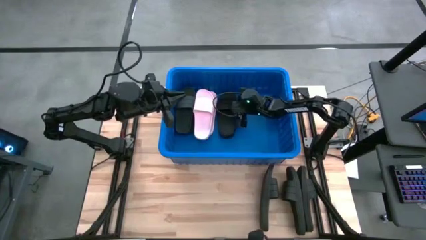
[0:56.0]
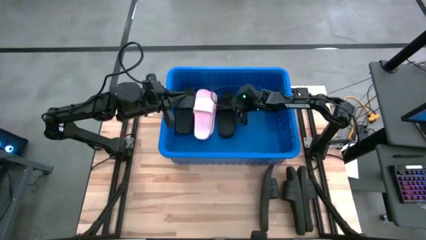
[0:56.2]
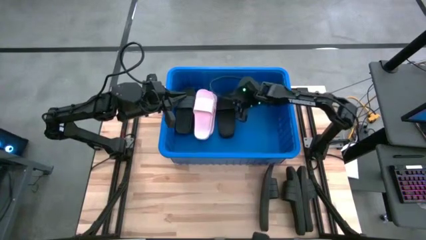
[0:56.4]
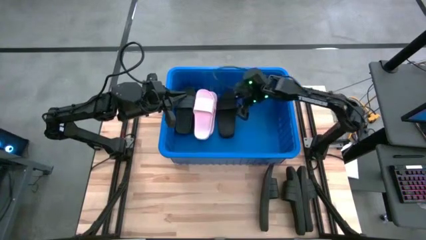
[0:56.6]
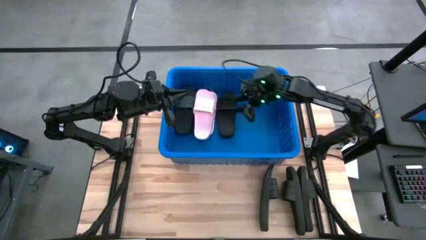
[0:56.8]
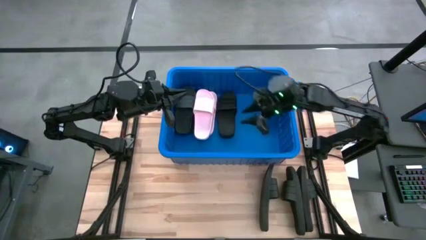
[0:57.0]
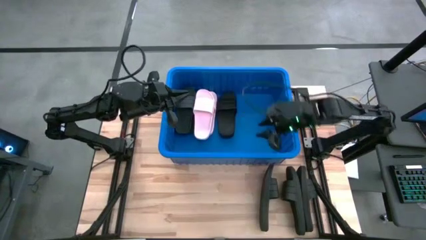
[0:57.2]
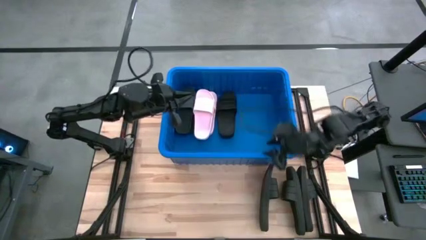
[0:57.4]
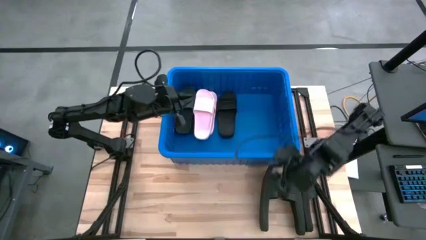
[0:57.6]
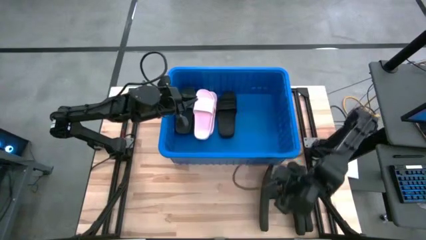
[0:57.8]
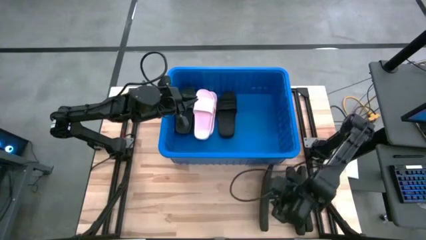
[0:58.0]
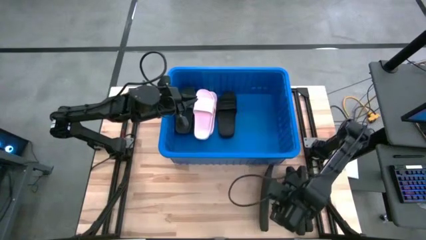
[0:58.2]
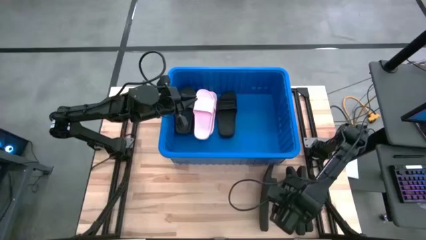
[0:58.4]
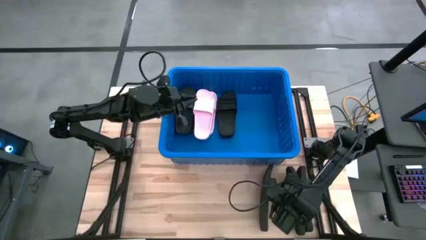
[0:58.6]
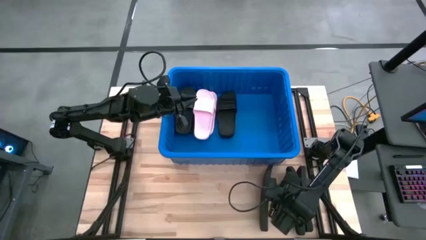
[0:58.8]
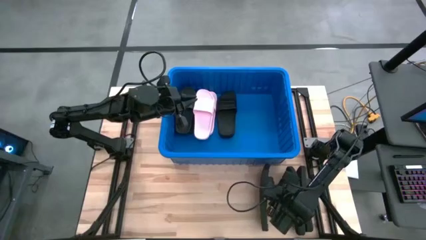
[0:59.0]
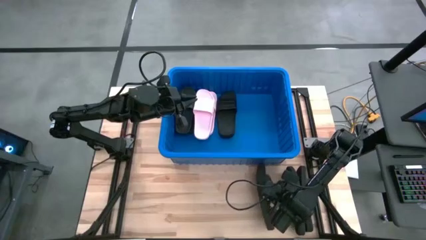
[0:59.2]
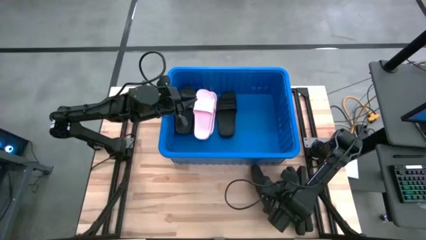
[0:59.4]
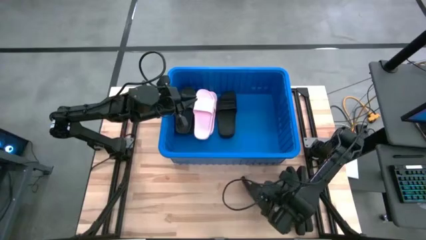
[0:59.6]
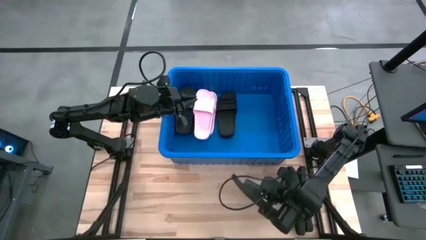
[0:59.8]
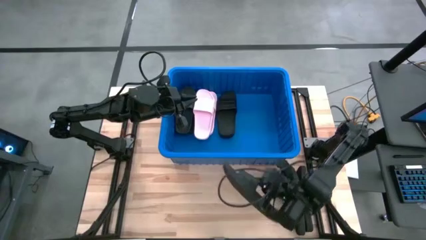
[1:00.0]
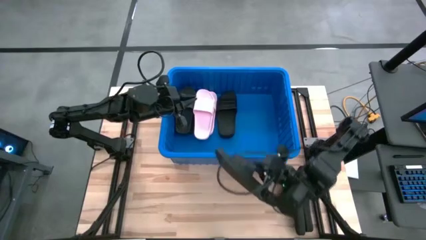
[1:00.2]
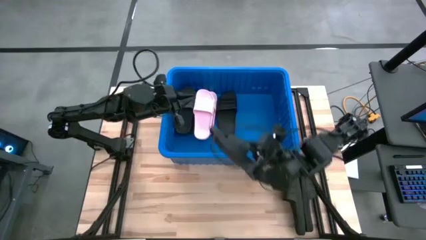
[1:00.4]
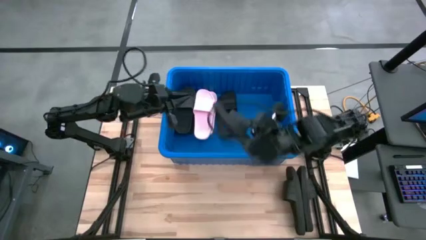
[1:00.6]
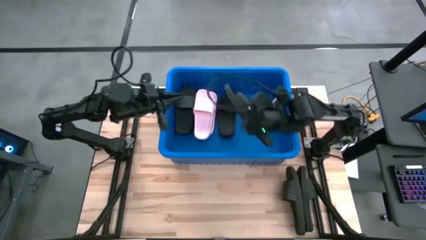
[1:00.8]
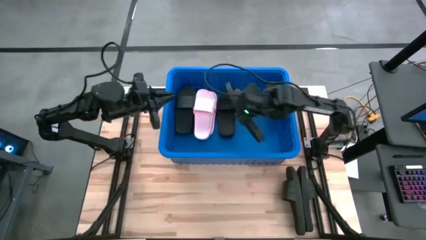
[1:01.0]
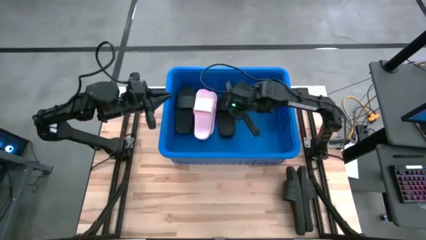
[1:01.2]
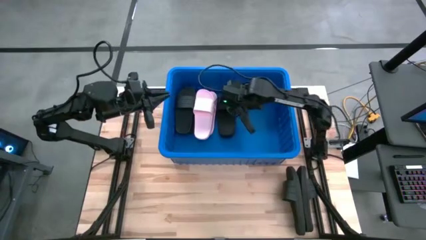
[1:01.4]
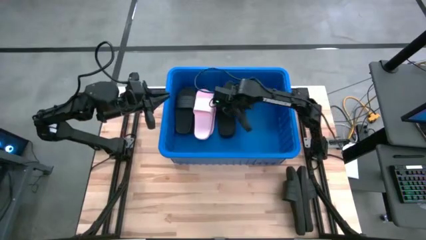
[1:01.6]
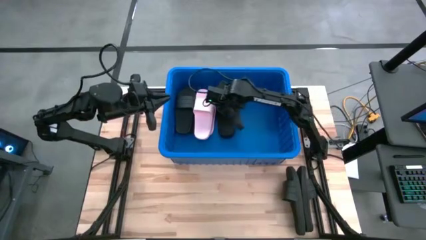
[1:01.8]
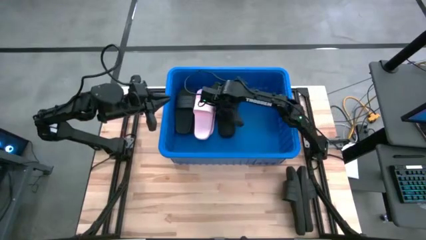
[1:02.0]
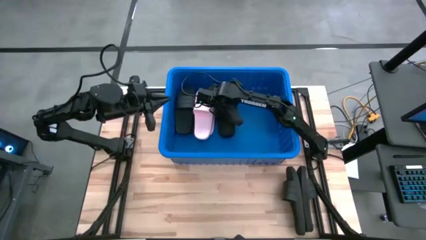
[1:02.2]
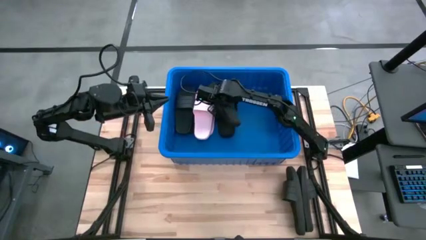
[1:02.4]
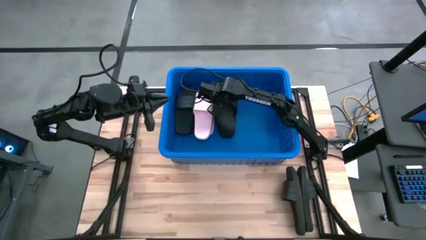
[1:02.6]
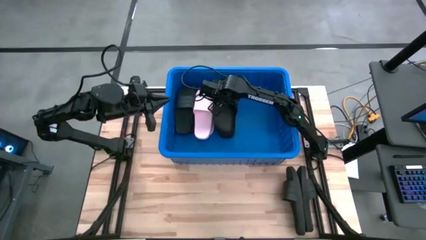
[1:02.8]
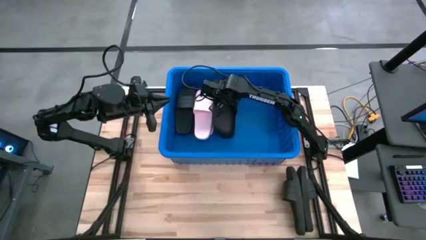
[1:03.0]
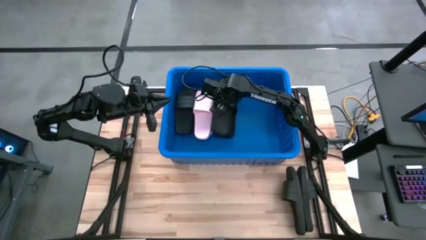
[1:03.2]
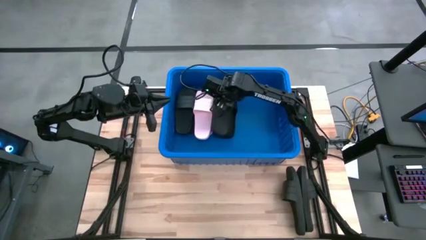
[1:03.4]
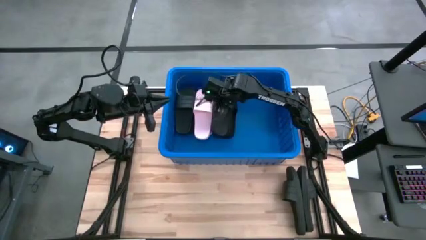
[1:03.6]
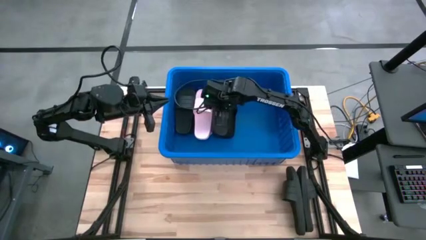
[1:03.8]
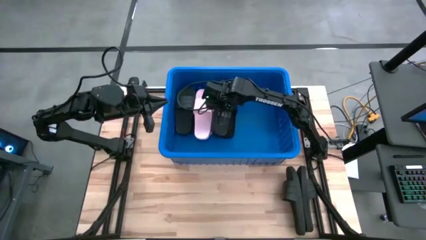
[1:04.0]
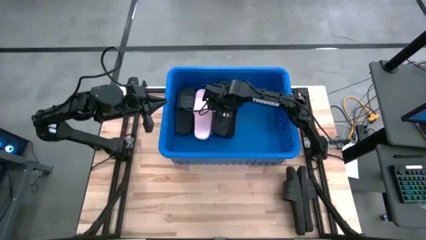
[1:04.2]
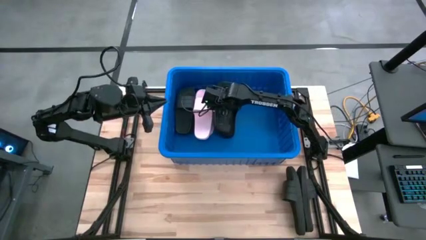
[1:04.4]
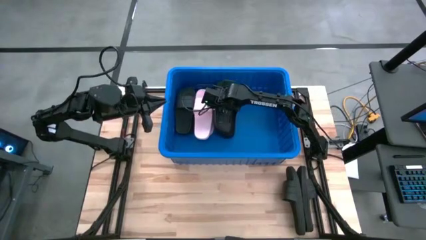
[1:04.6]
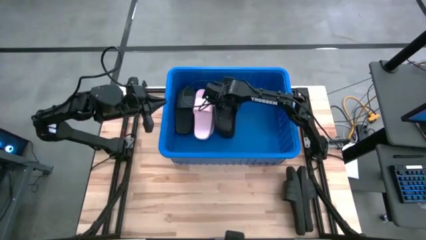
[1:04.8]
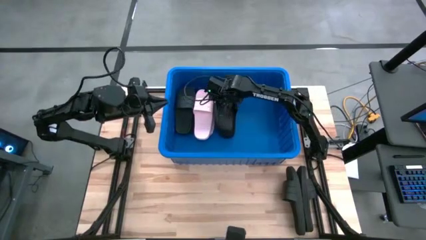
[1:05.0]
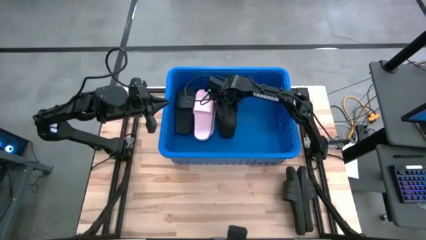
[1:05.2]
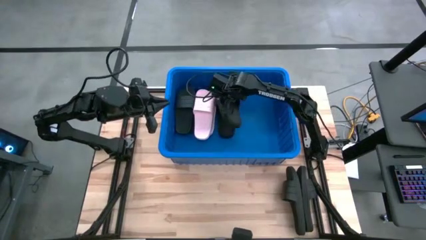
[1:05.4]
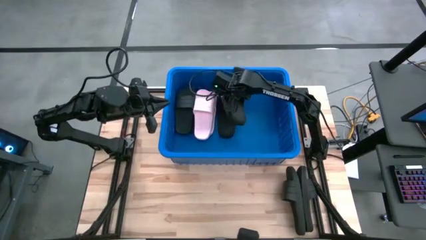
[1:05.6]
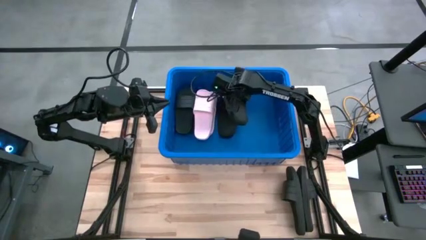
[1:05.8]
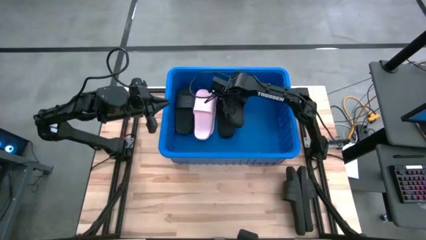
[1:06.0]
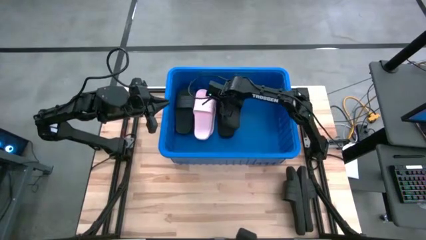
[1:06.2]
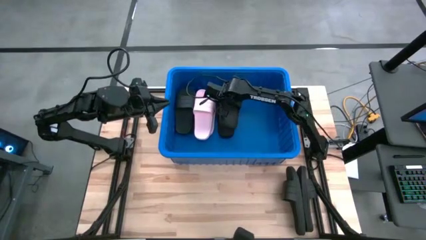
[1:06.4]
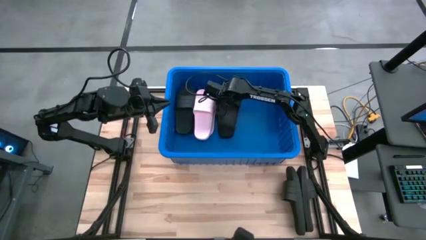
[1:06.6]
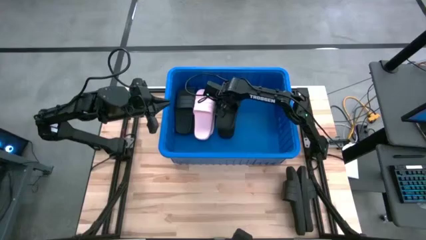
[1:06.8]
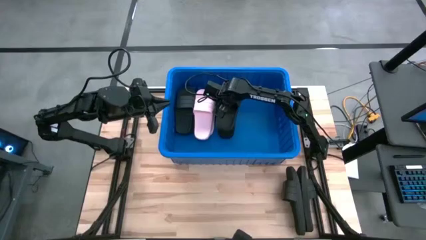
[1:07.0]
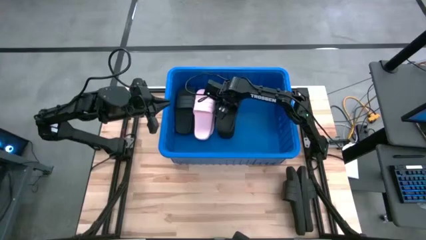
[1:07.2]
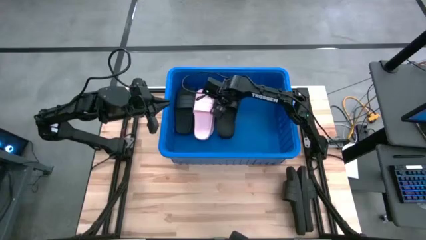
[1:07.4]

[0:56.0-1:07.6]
Task: Pick and place slides into bin
Put the black slide into the blue container
